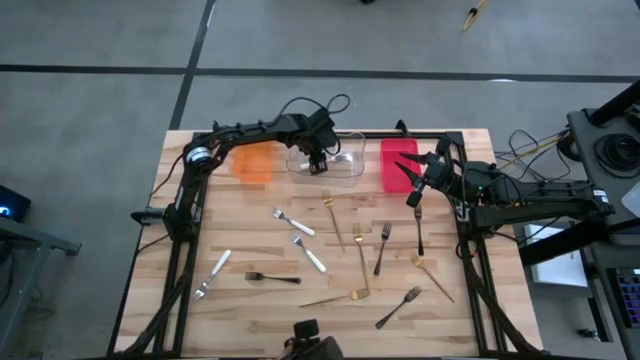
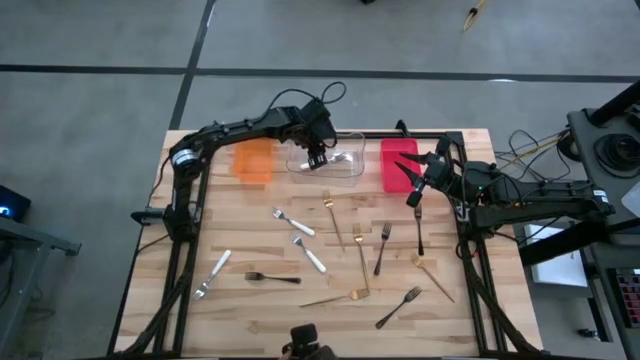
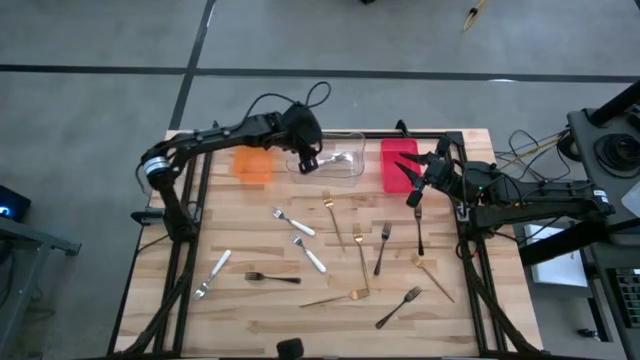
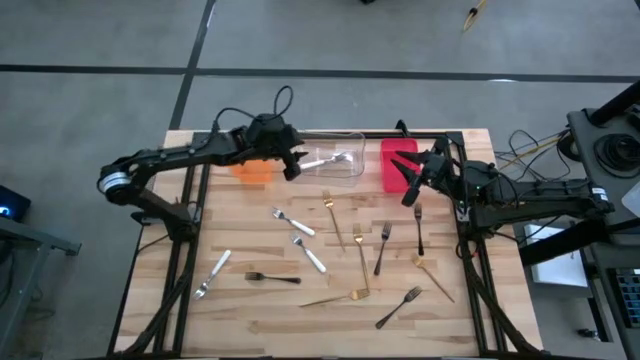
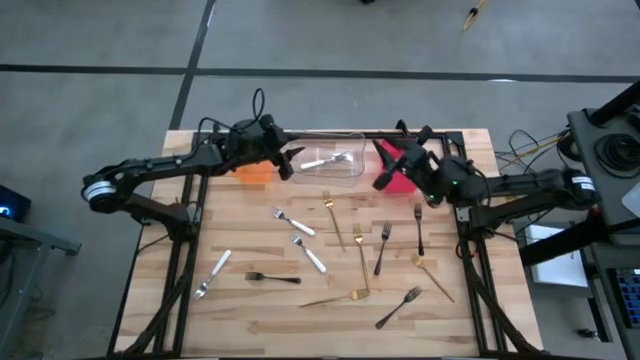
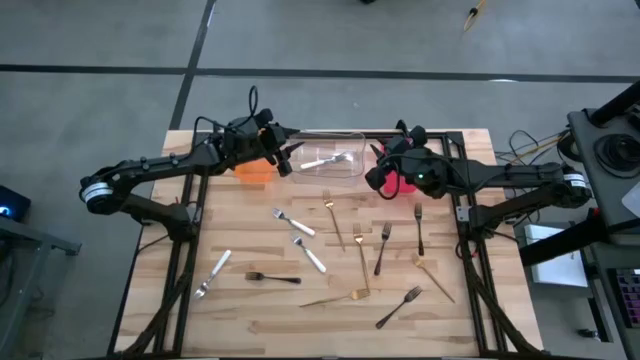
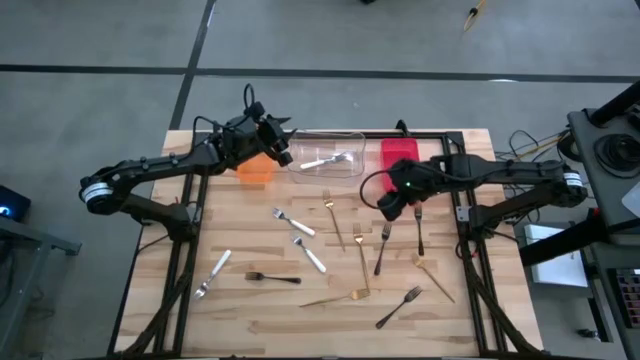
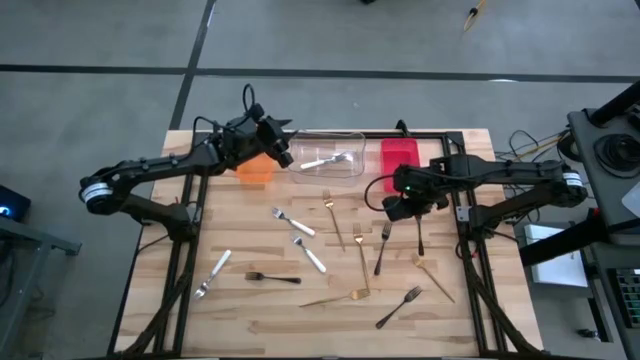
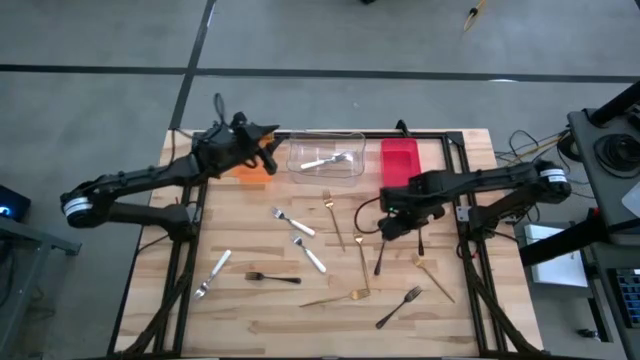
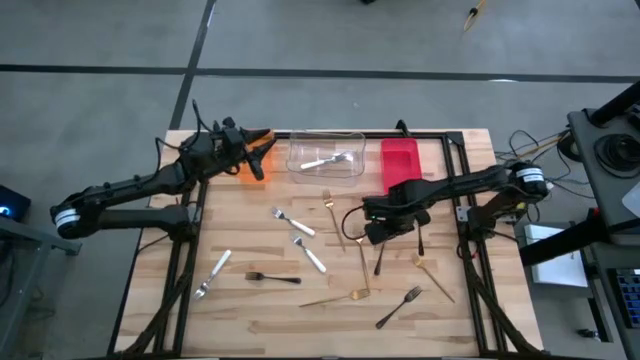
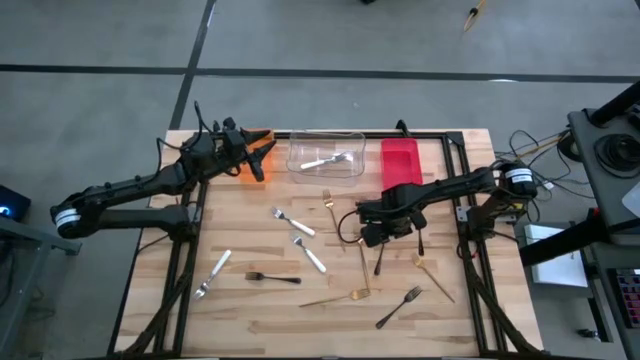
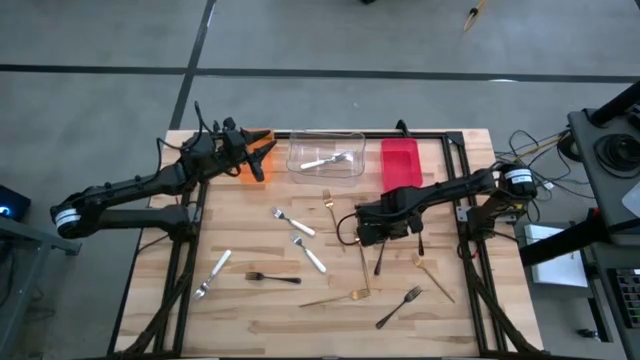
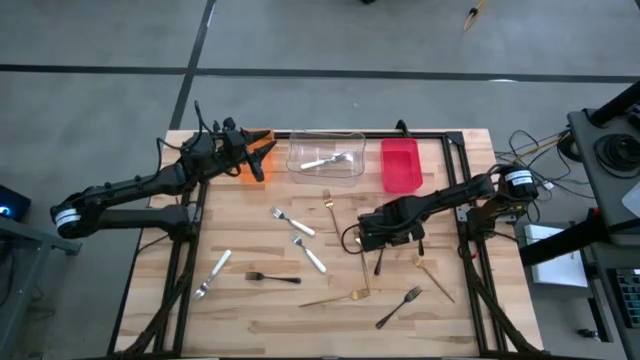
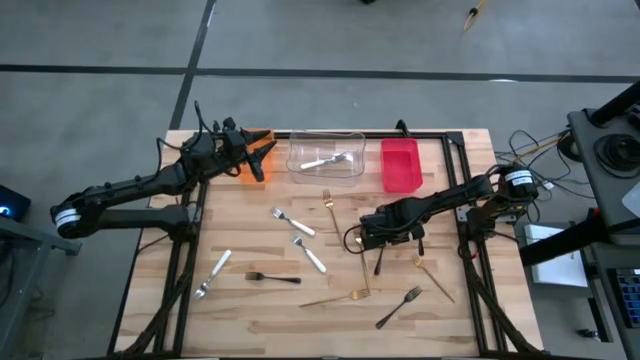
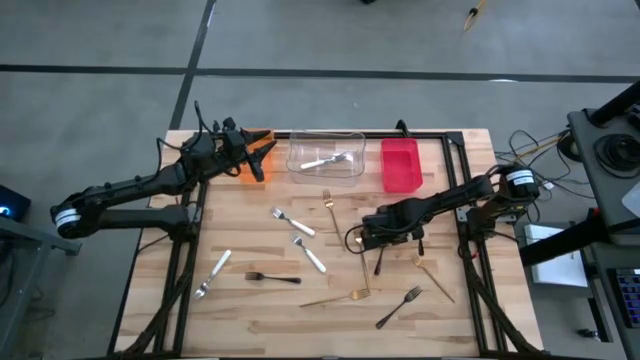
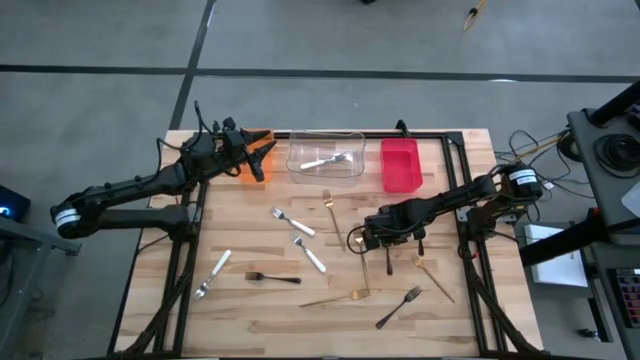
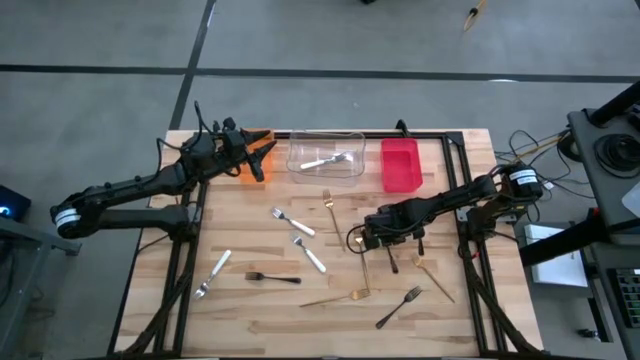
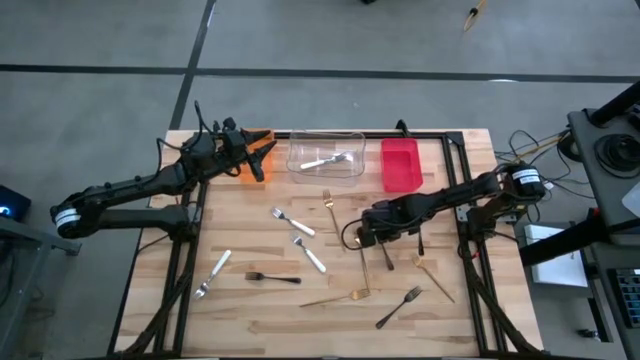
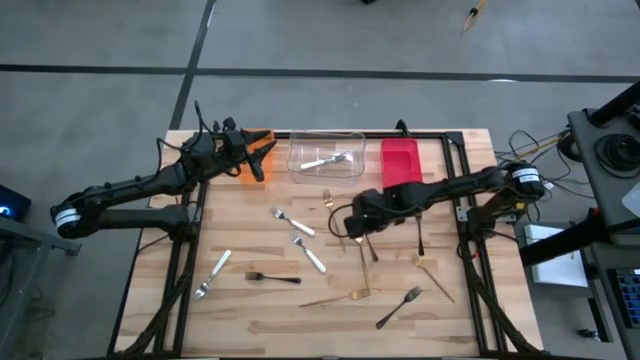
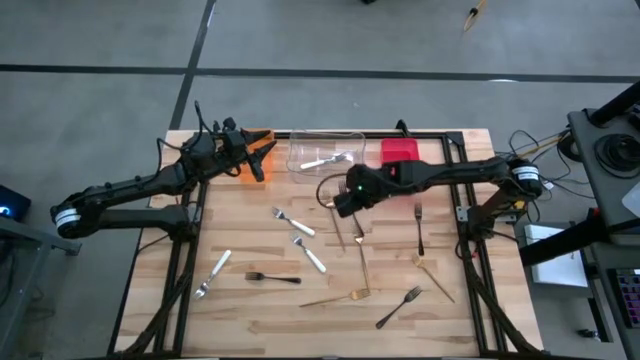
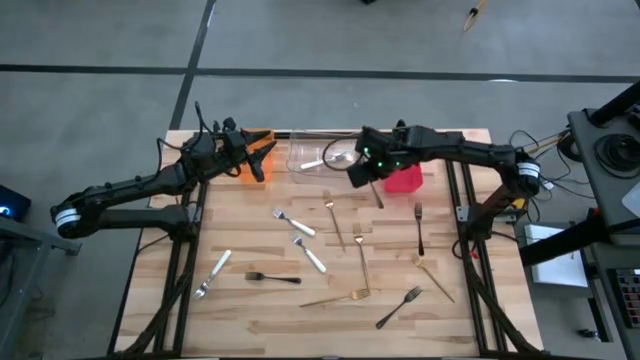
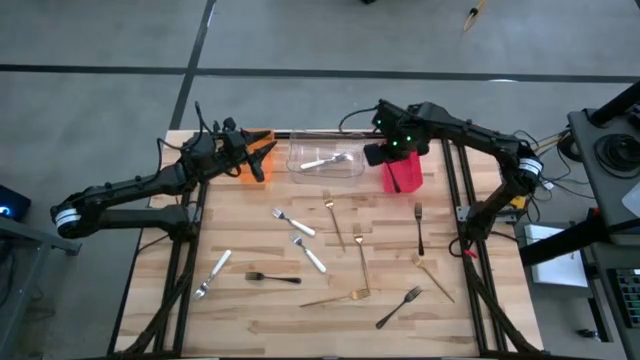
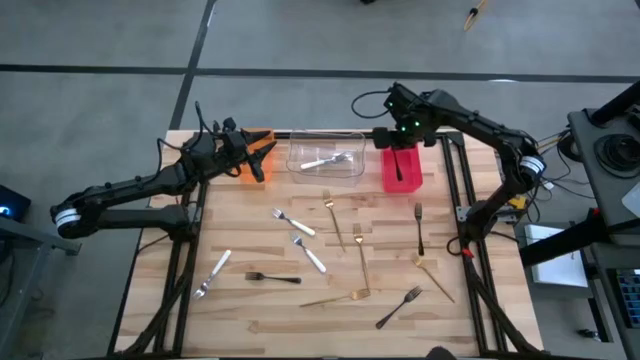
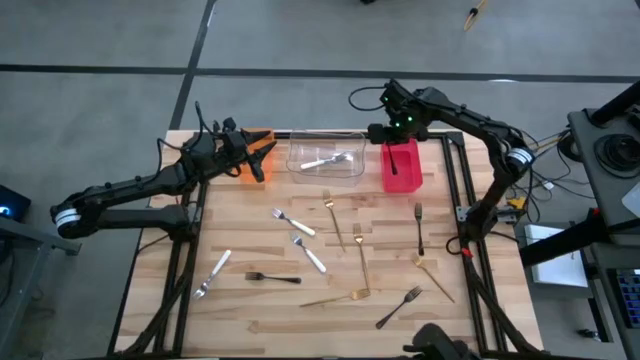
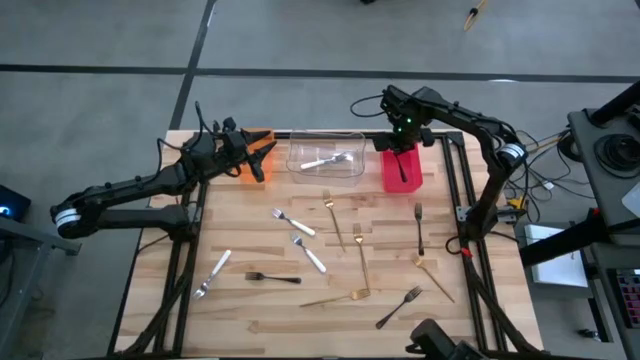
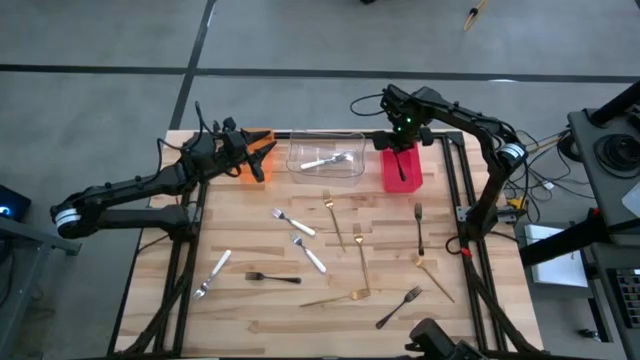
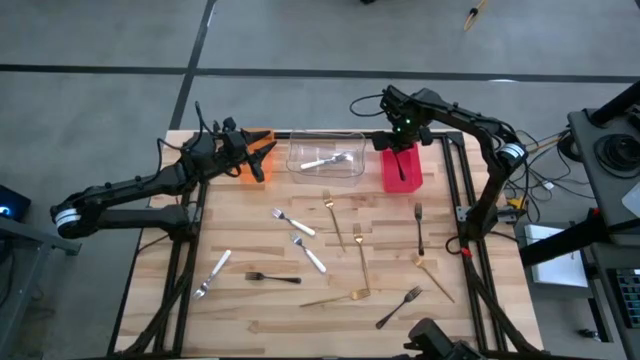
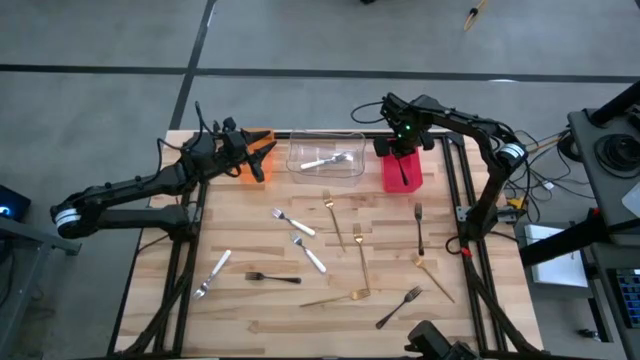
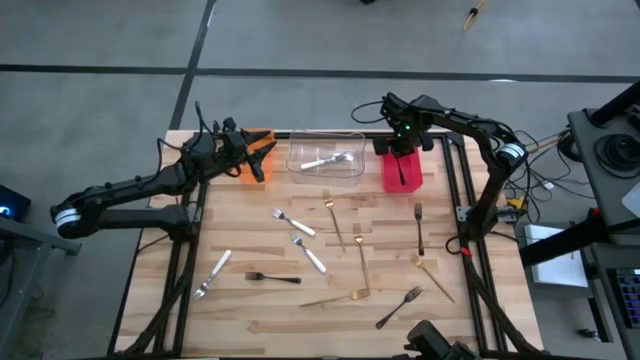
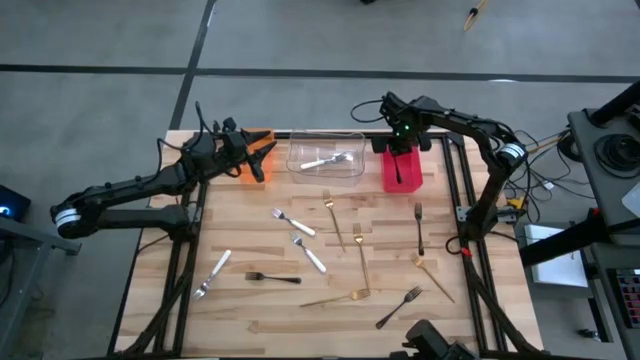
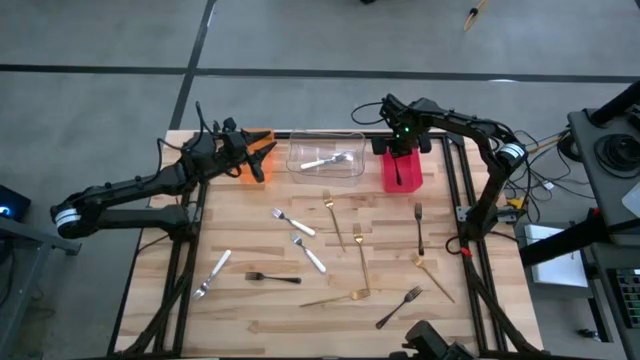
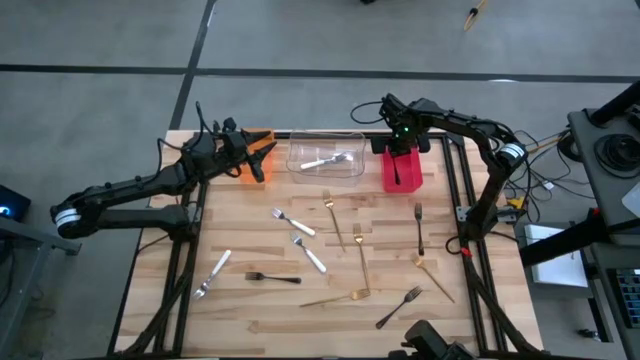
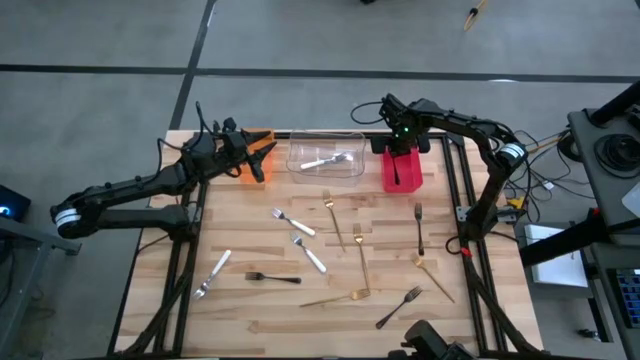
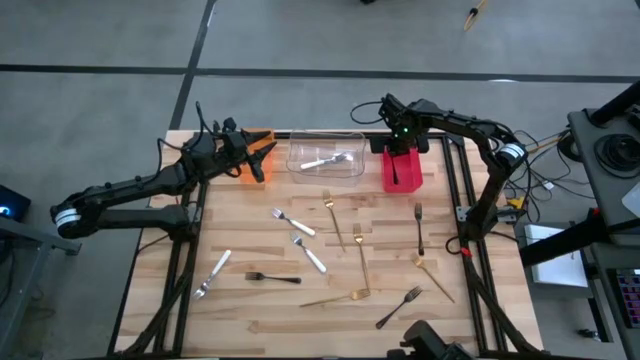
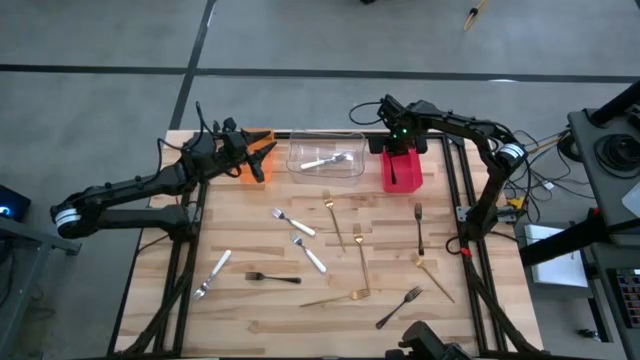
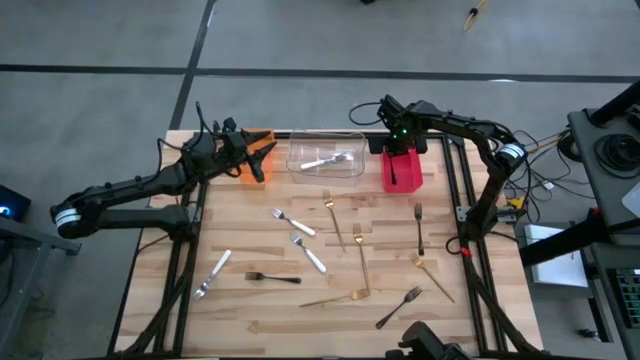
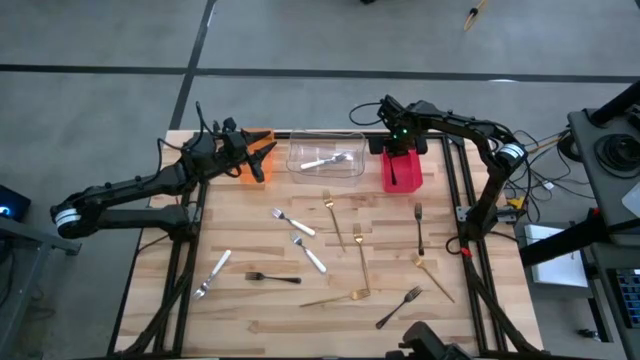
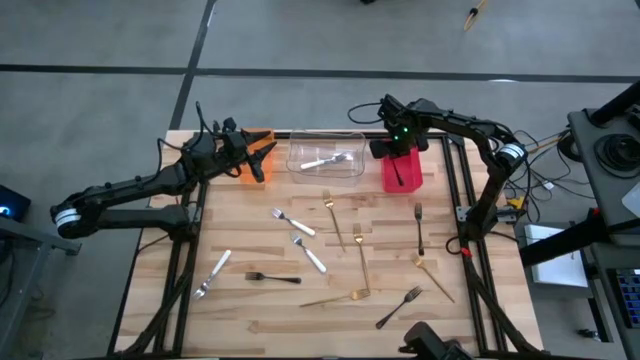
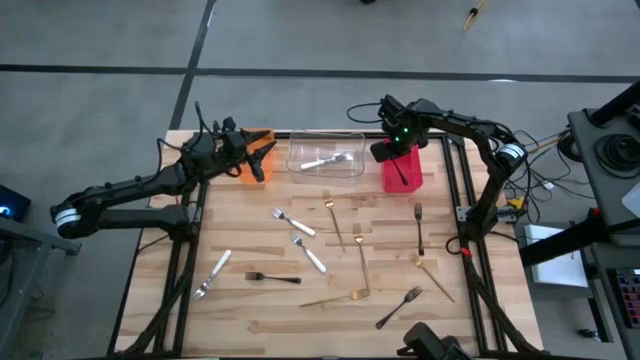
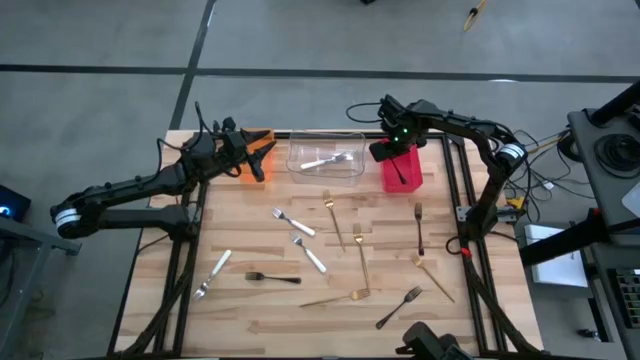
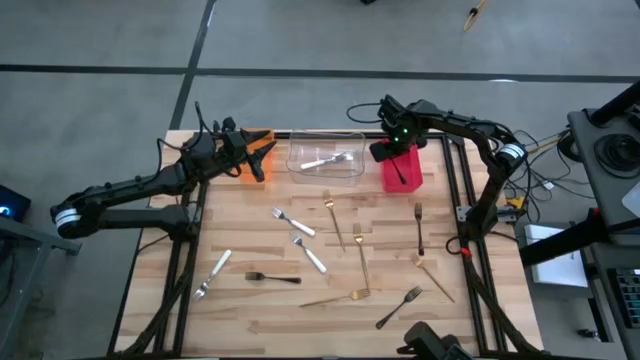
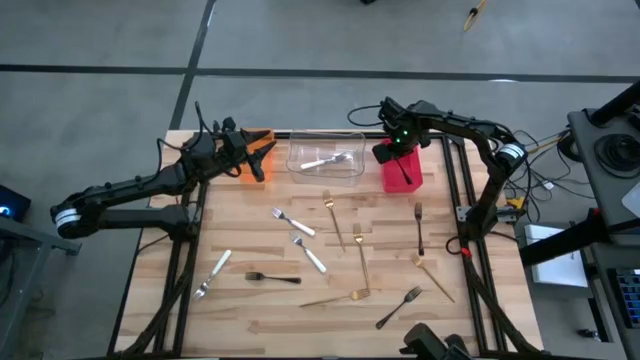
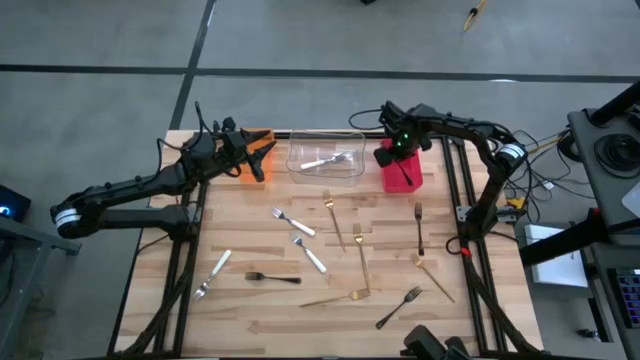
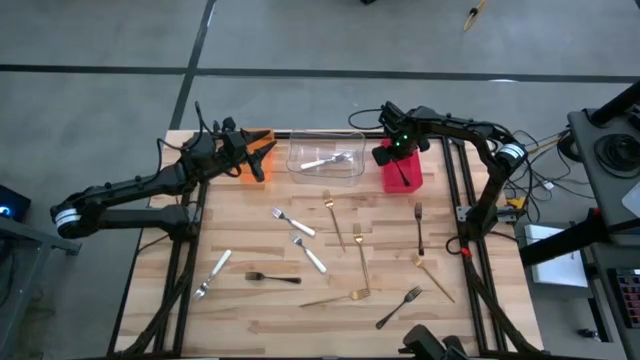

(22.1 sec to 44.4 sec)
Task: Sort silverware by color (type)
Put the black fork into the red bin
